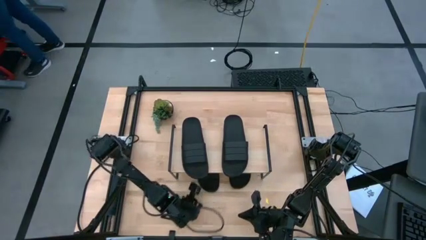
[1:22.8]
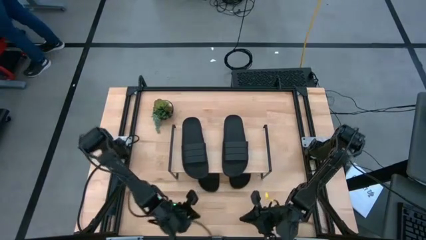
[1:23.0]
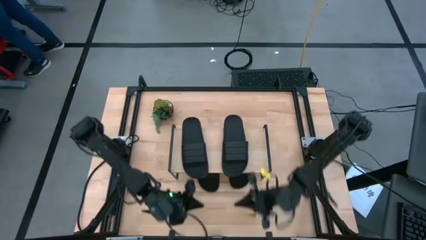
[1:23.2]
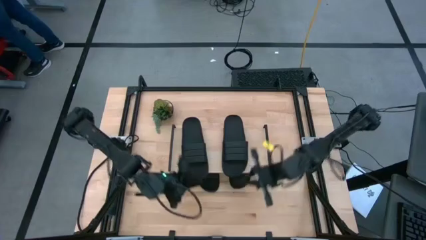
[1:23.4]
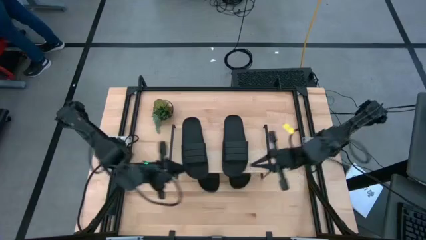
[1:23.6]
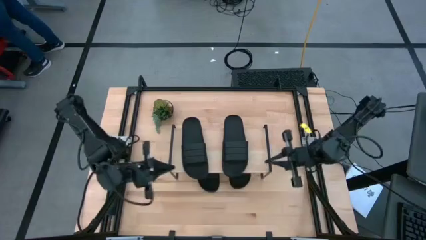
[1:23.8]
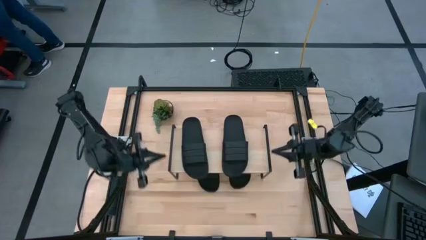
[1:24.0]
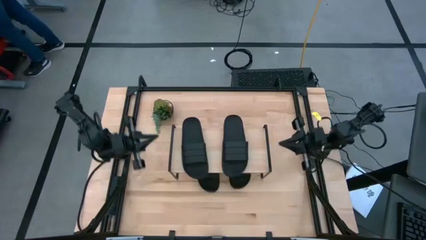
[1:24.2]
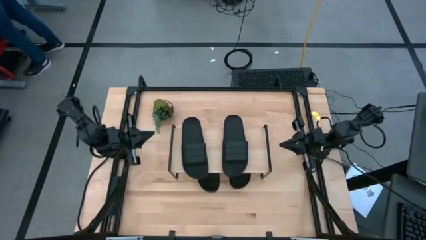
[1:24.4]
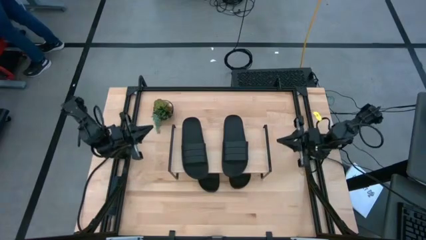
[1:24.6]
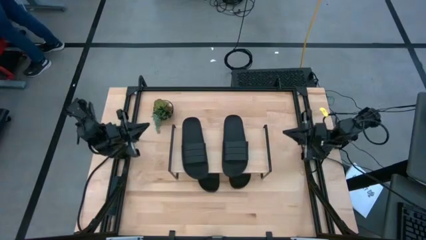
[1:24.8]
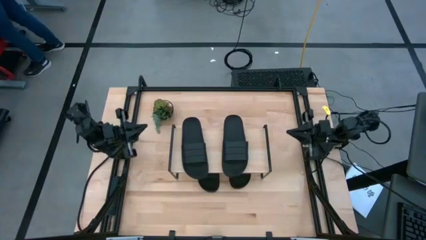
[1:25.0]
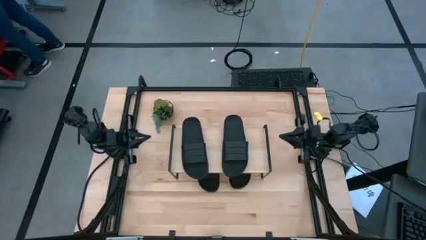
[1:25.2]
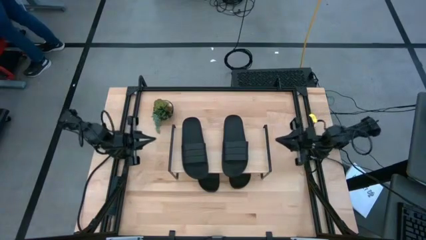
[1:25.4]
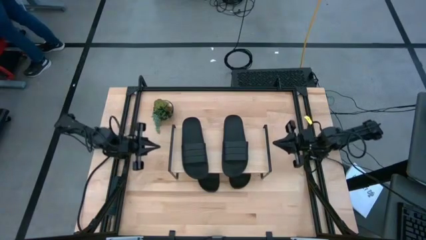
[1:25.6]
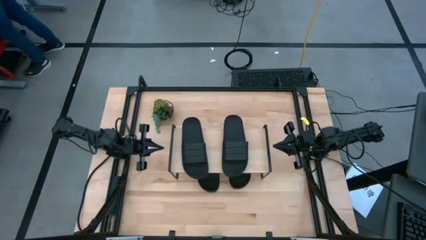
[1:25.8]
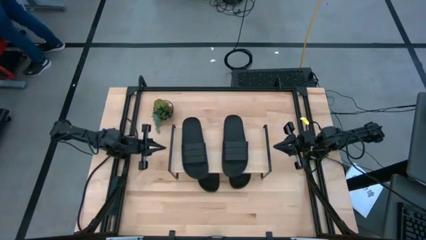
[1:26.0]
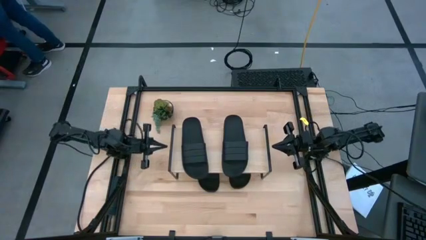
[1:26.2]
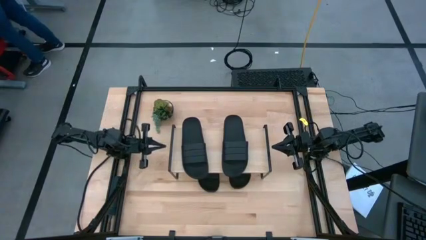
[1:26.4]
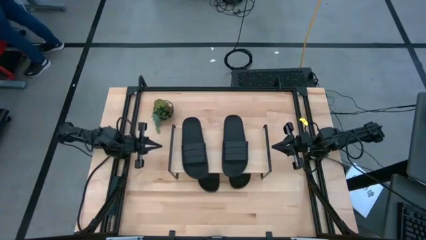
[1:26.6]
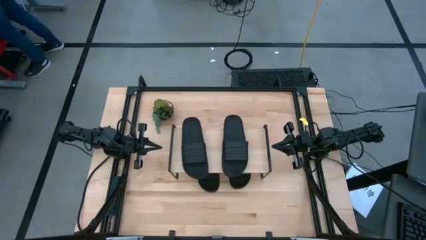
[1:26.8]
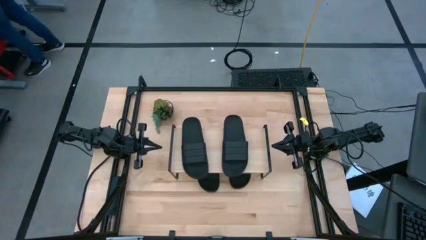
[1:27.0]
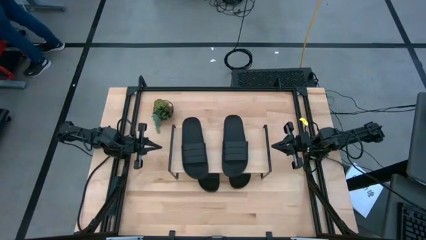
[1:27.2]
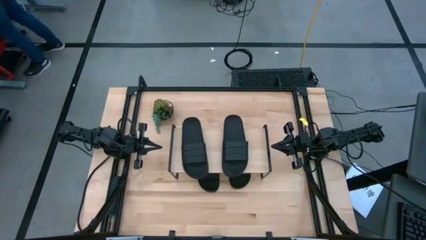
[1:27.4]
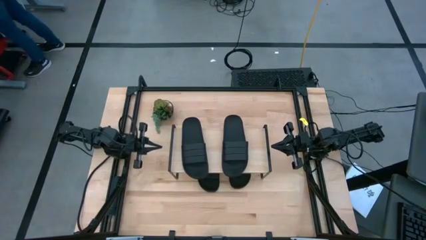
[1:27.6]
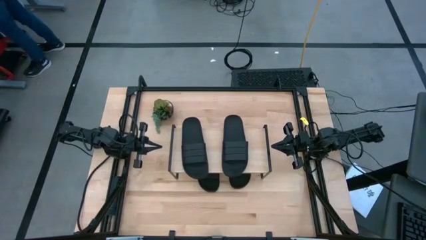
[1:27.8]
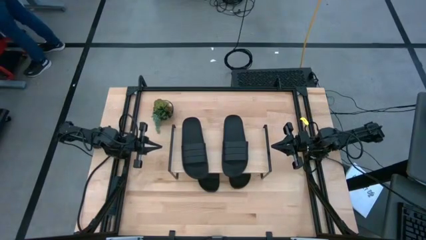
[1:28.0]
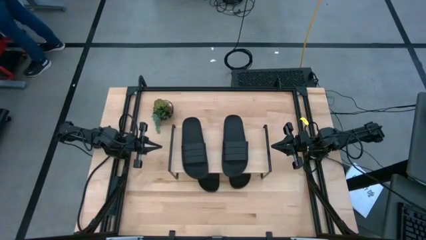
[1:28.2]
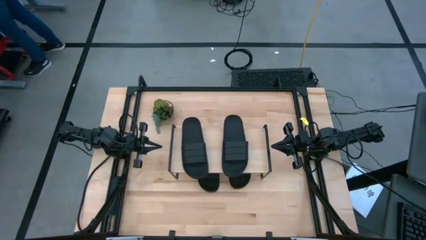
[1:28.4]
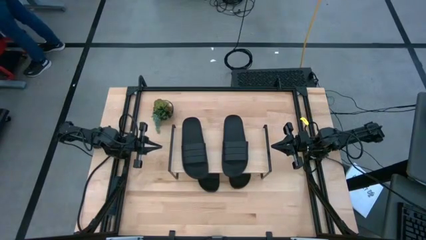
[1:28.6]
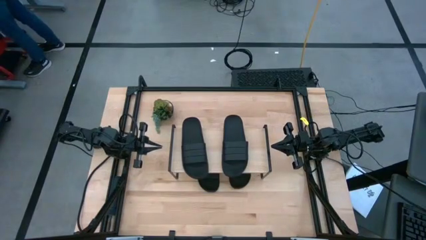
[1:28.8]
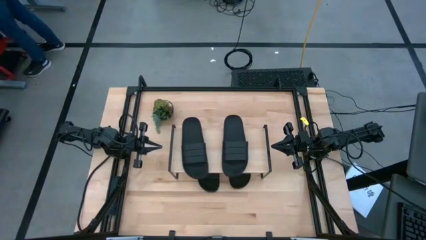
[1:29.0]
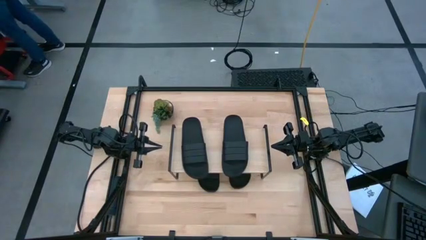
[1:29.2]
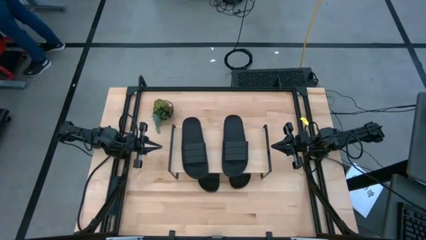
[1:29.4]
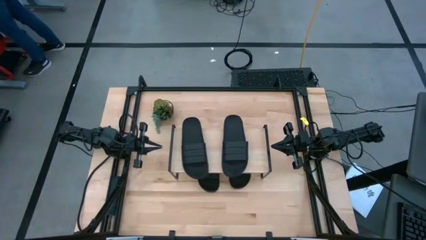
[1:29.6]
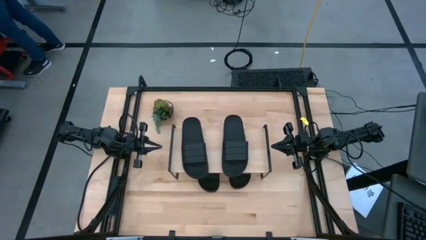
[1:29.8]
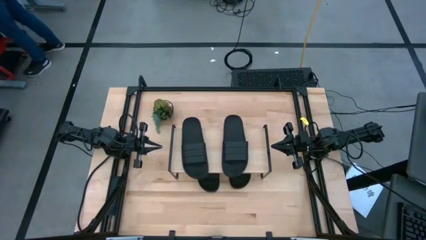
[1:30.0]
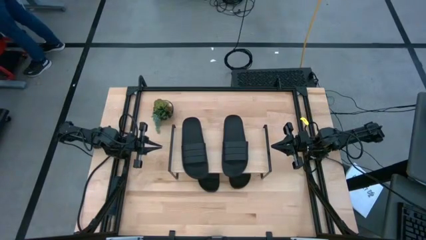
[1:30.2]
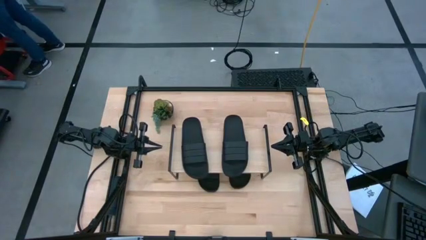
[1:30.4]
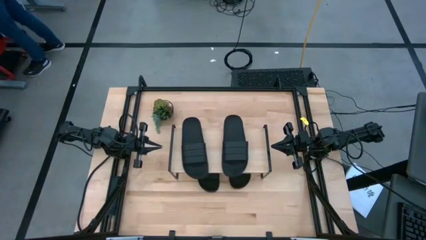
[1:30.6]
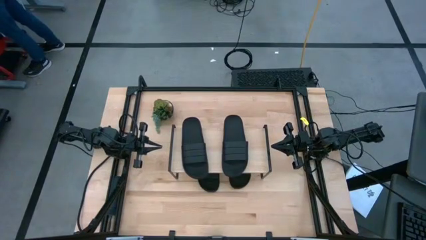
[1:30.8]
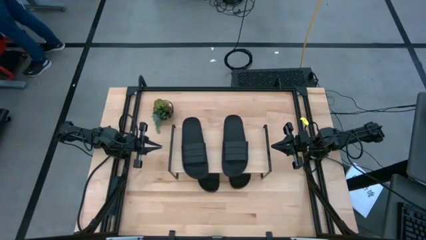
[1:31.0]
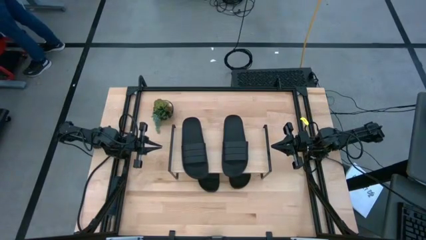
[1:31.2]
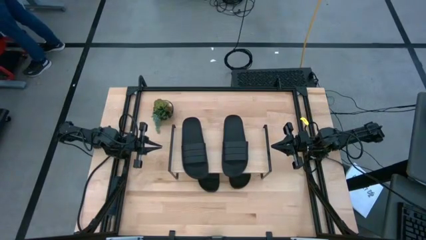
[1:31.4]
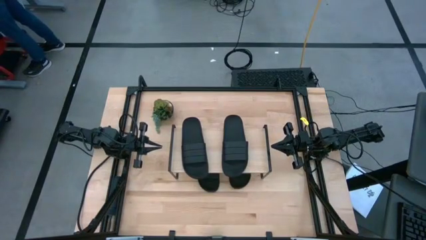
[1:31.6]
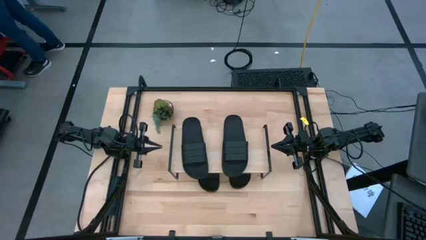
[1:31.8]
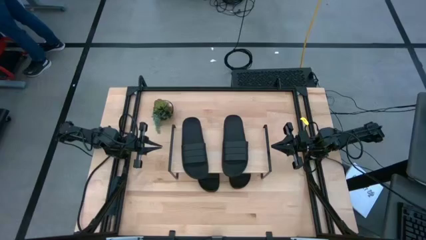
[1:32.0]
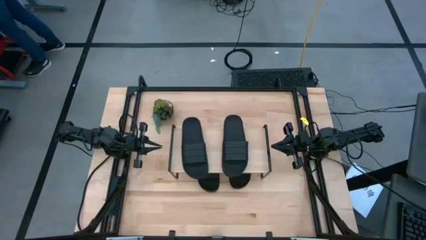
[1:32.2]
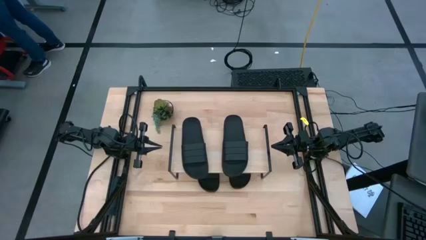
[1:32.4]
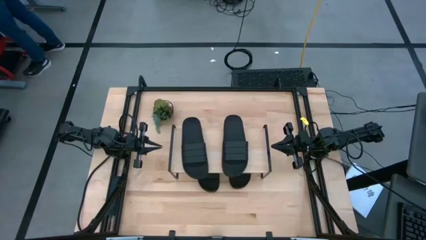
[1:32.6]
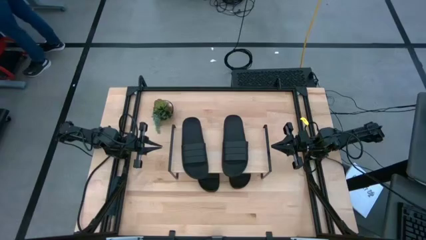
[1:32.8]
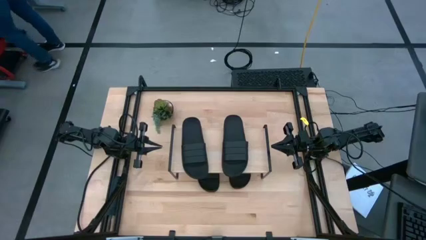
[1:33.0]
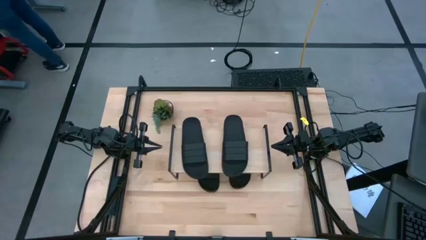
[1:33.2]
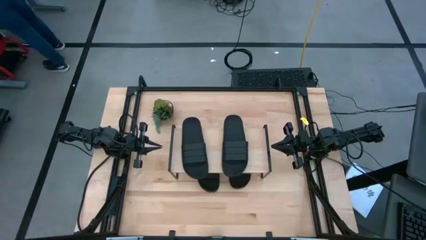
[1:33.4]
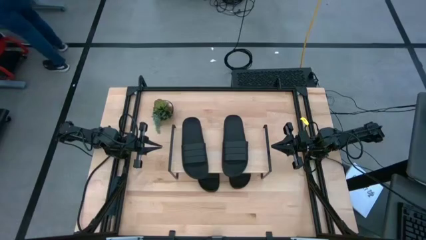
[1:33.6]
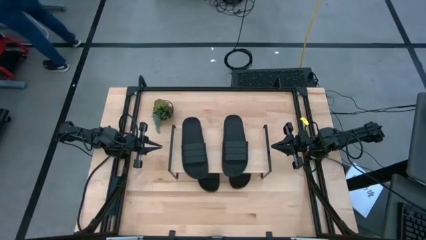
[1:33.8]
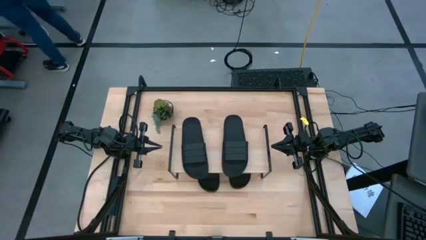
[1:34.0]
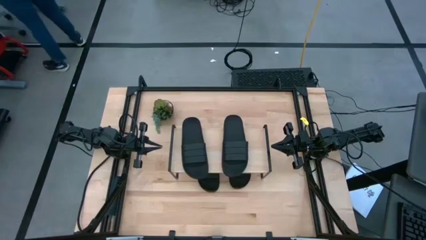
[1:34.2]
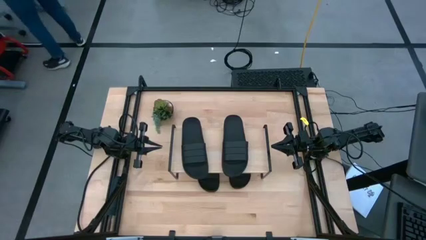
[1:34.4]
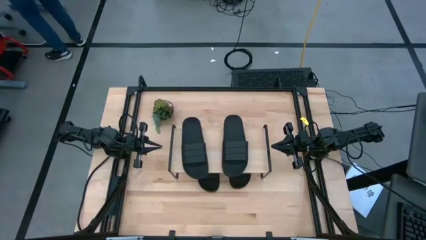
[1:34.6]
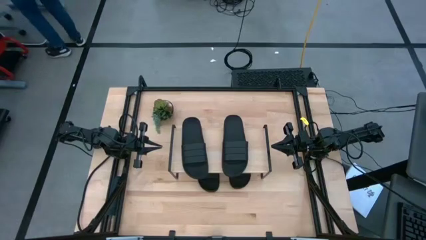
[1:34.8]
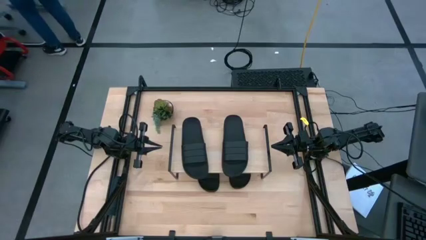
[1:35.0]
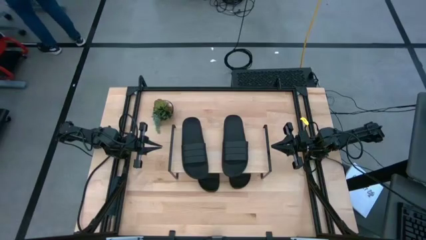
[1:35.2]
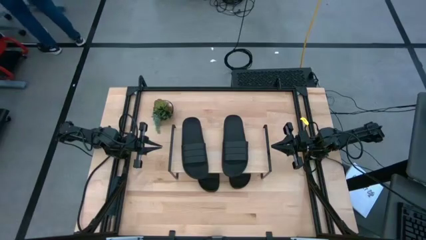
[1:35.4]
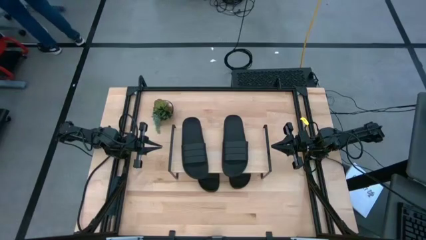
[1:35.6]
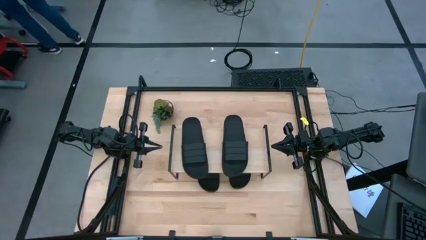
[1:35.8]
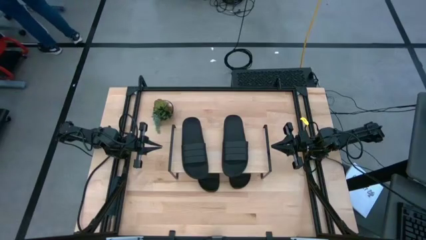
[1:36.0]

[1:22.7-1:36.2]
Task: Pick and place slides into the shelf
Return to Home Position

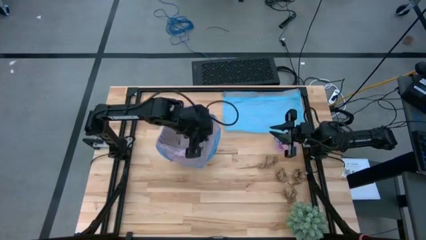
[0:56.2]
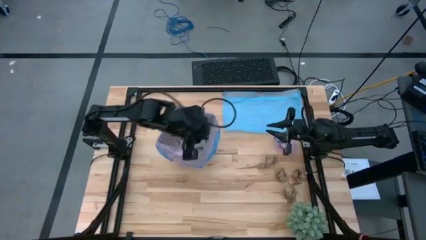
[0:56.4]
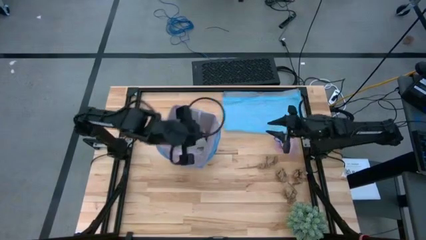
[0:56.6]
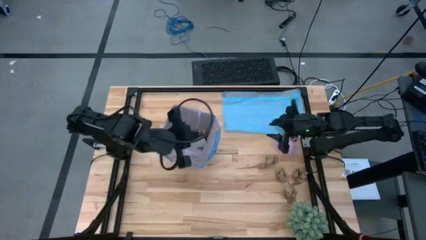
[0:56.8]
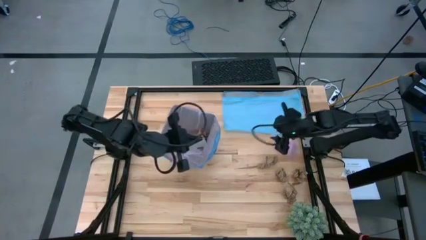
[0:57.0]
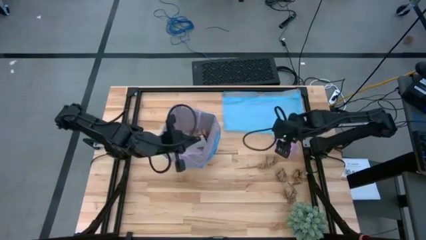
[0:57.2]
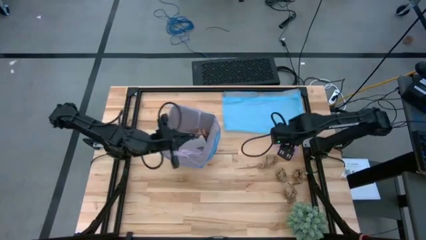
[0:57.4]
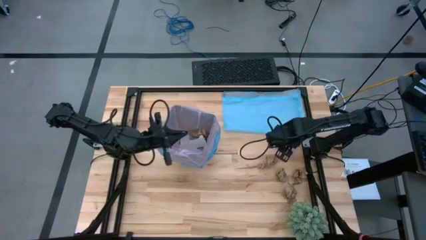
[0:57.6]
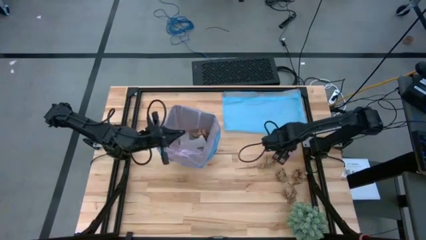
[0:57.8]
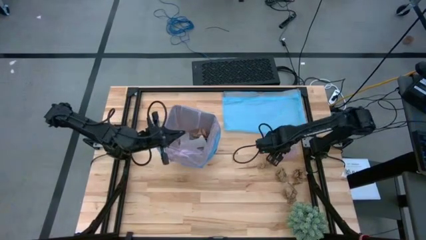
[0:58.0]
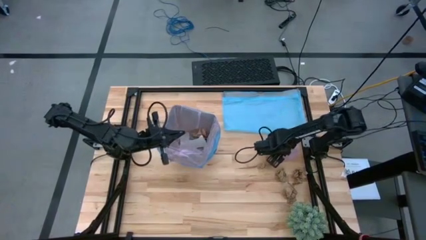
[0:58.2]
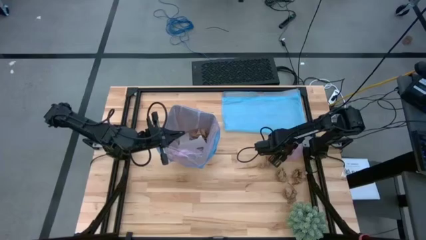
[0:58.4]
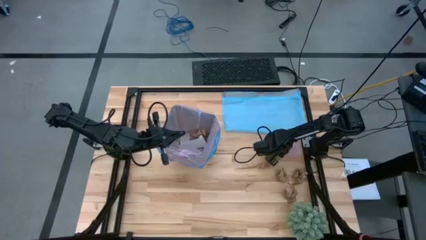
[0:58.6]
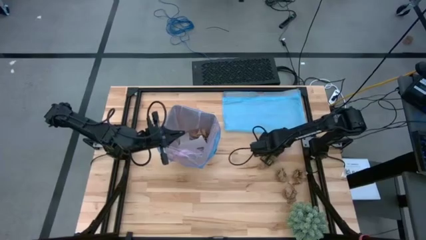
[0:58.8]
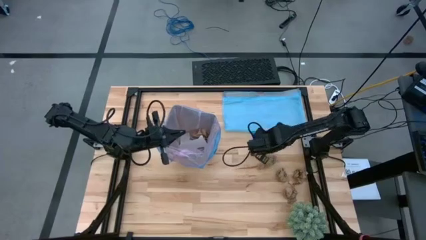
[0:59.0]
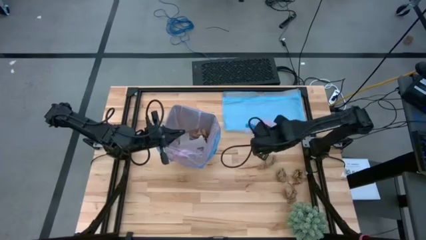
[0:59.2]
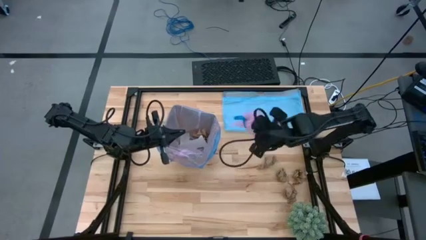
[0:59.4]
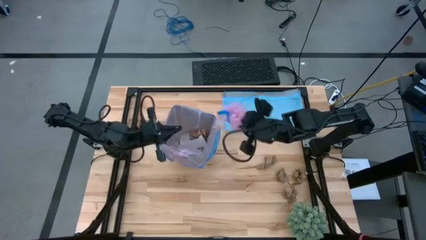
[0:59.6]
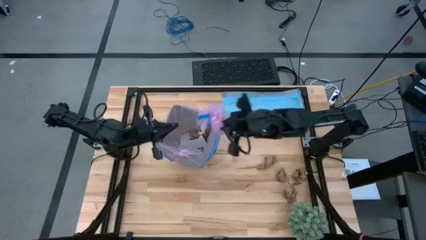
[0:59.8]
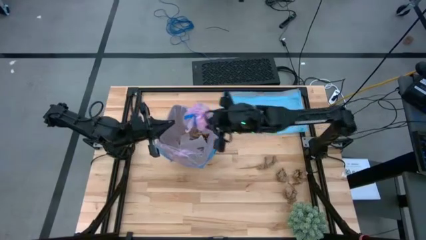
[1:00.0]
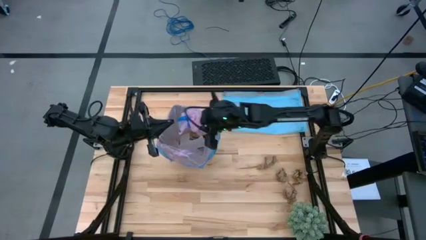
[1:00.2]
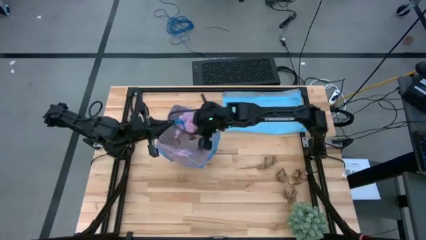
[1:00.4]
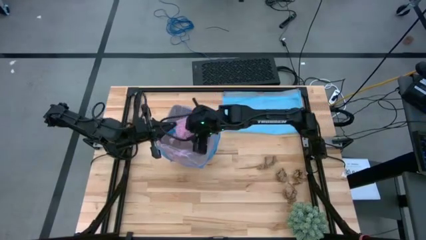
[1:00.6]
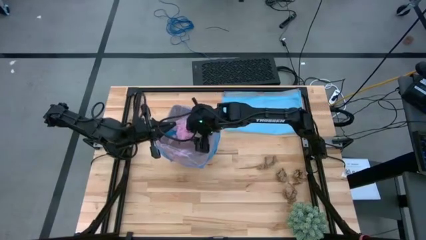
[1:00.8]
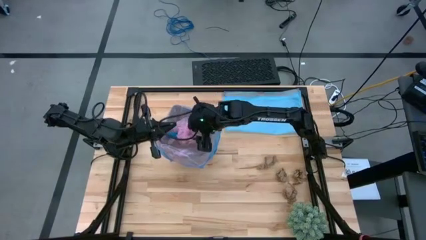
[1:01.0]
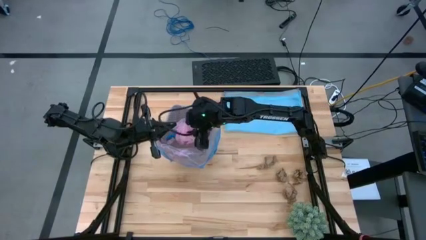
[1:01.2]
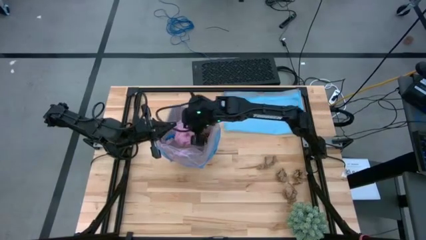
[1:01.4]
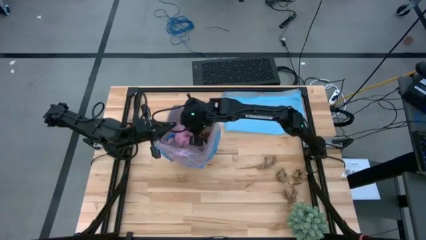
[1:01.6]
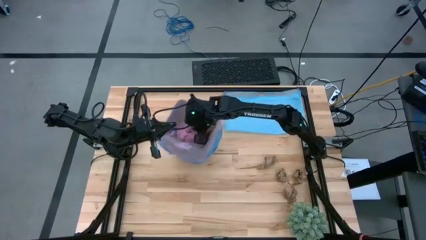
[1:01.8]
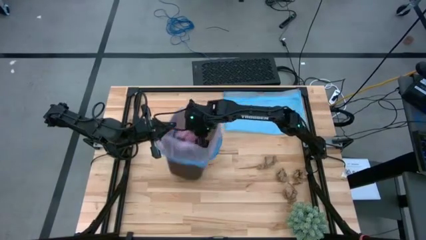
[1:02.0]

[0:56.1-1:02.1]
Task: place trash/remove bag and relplace
Put the pink trash bag into the trash bin
